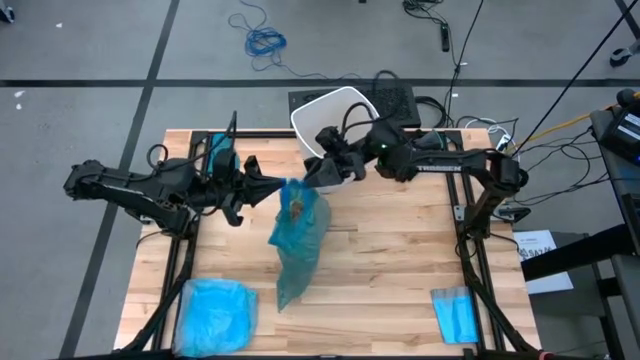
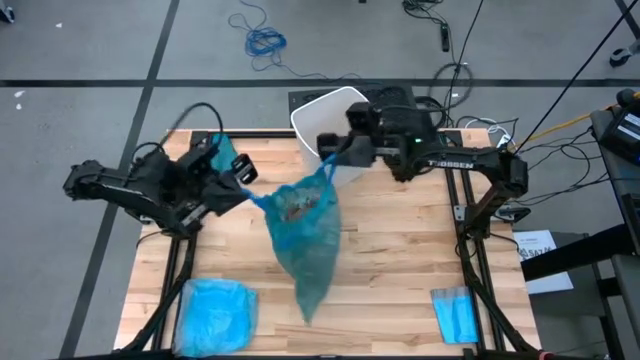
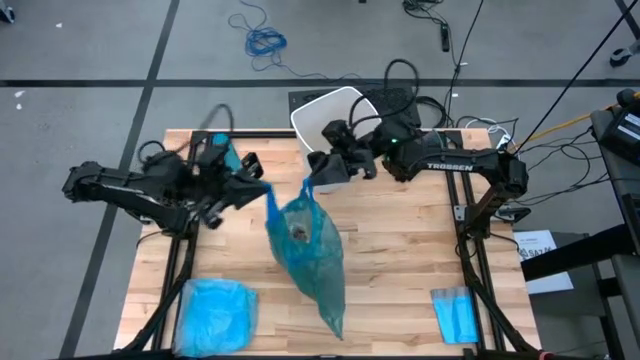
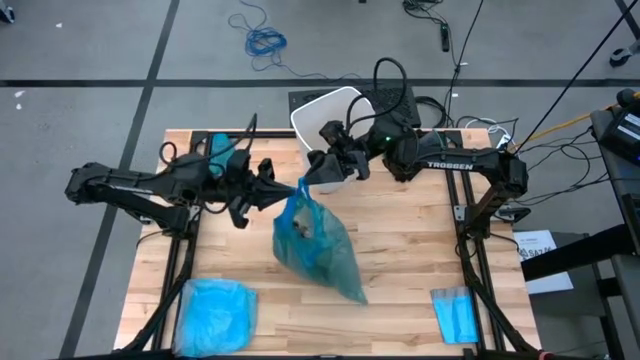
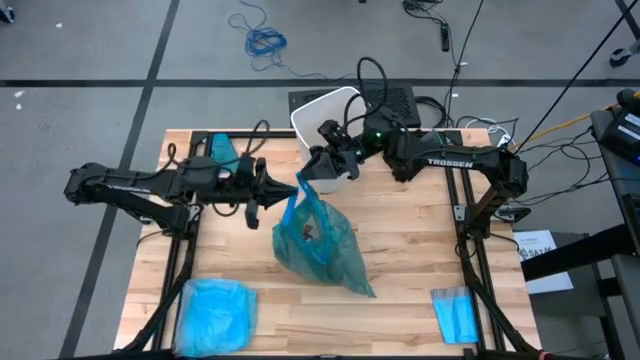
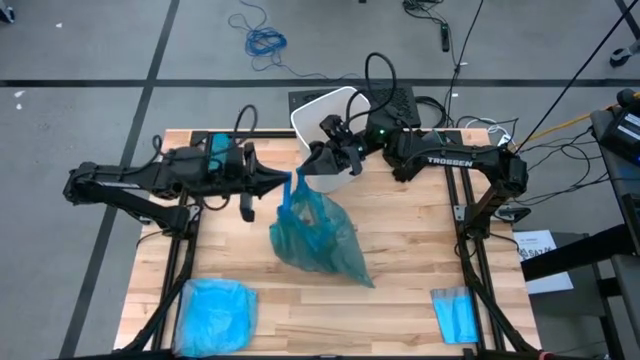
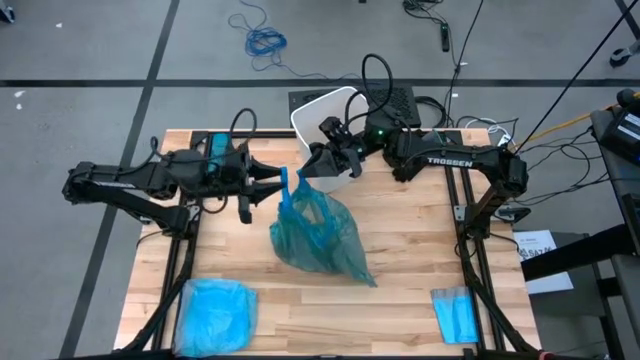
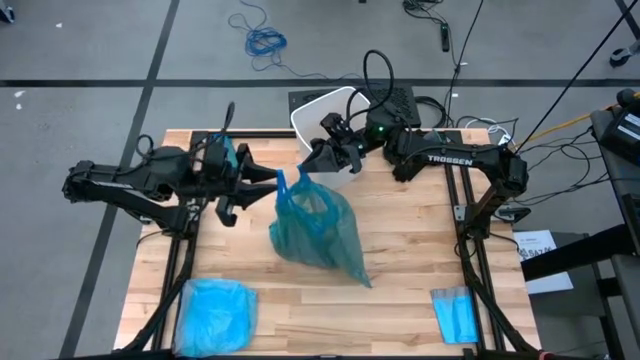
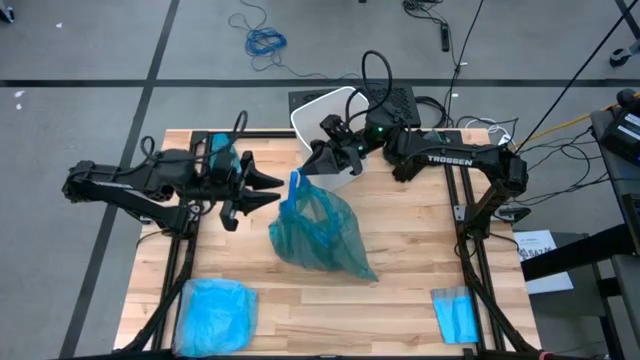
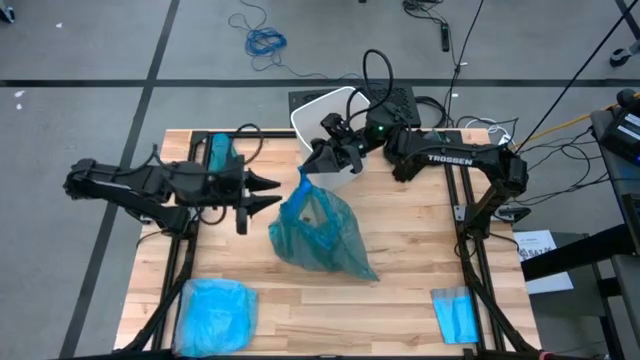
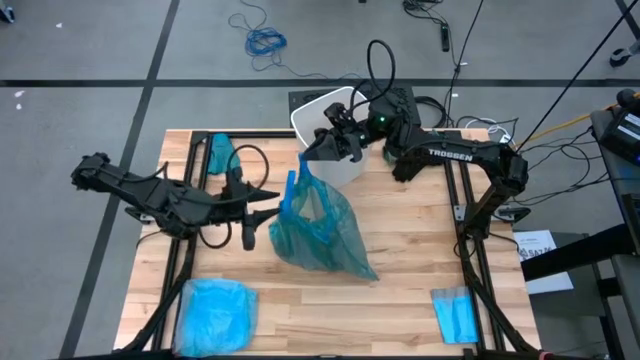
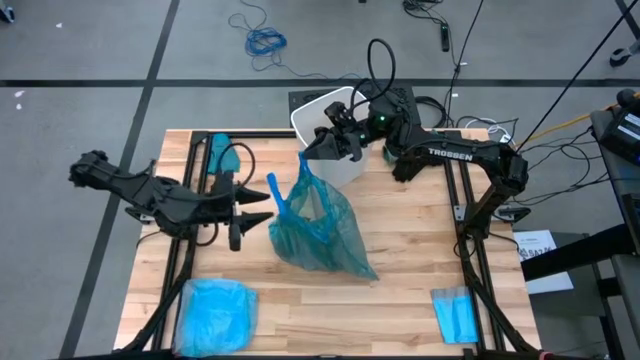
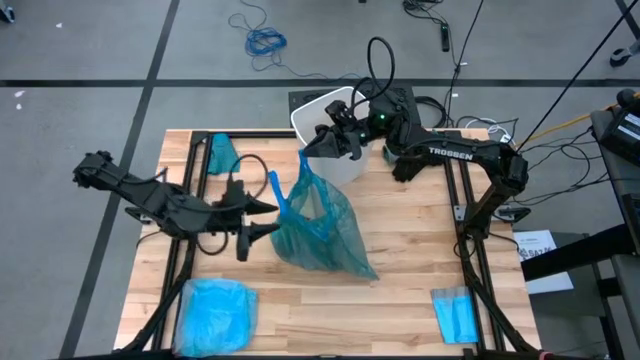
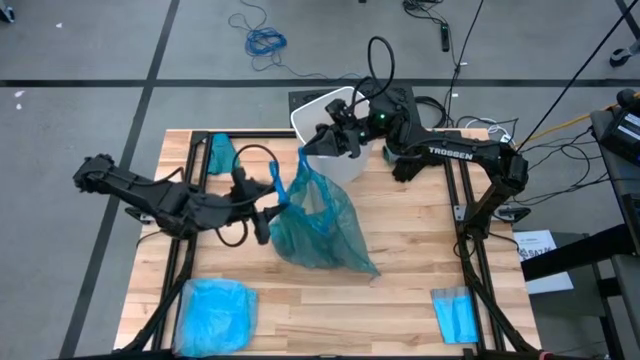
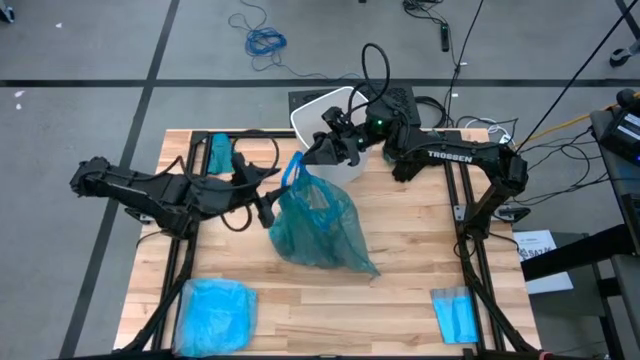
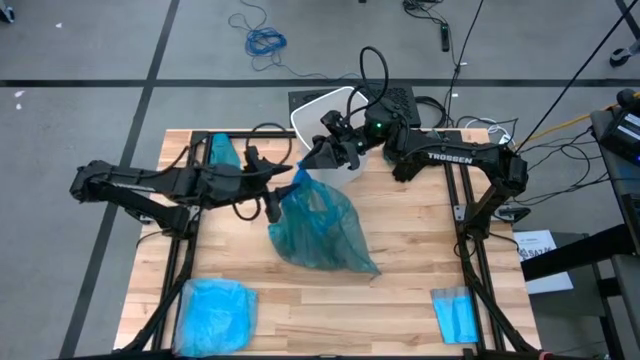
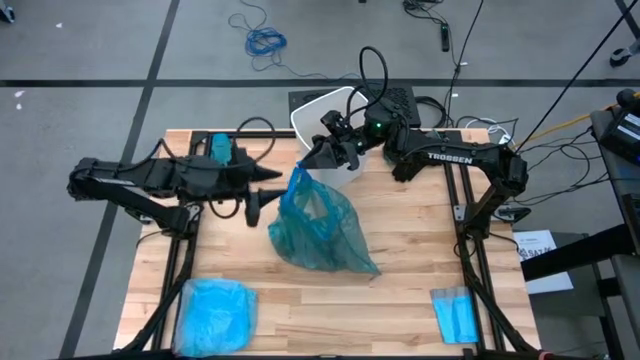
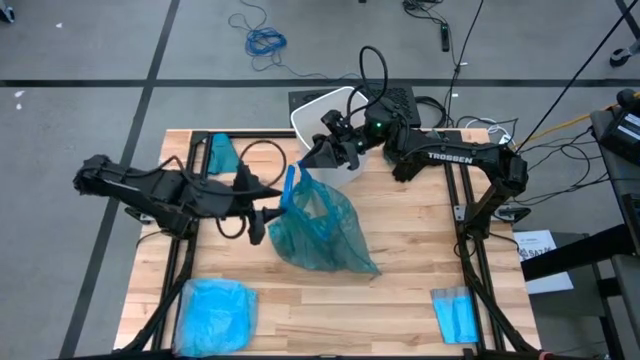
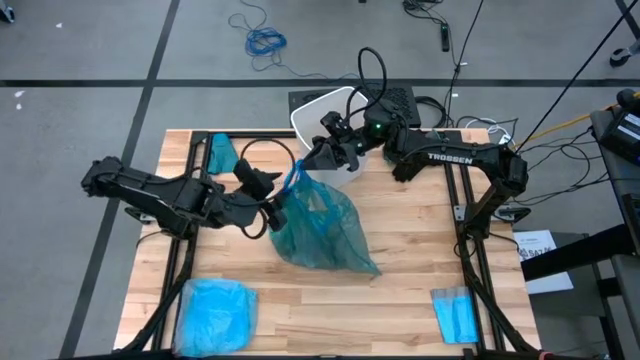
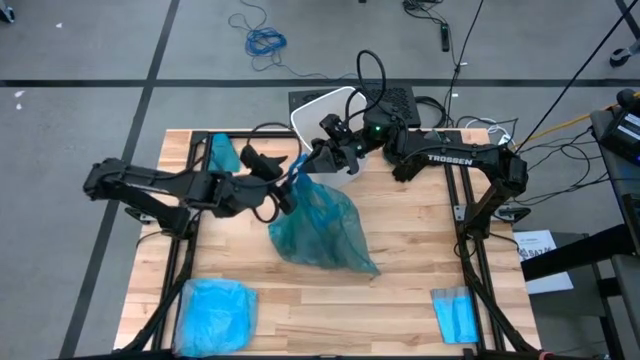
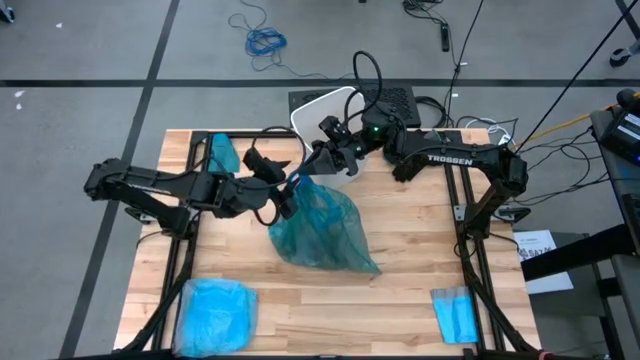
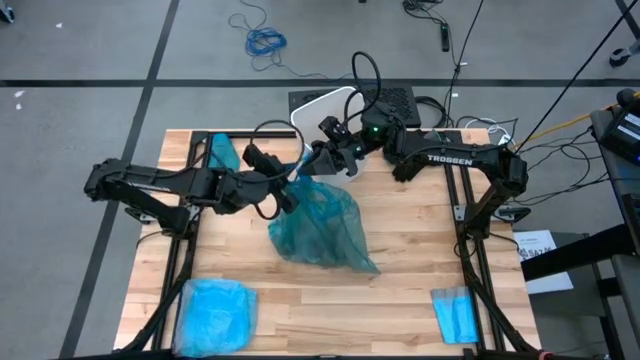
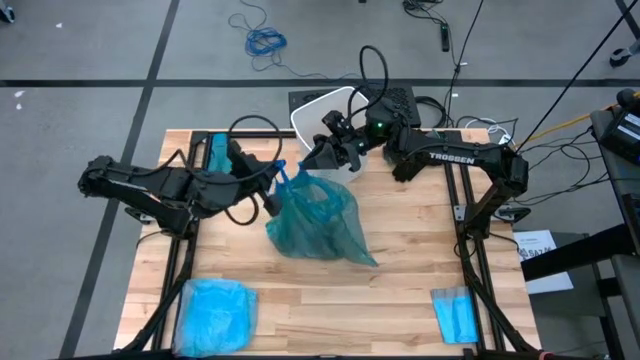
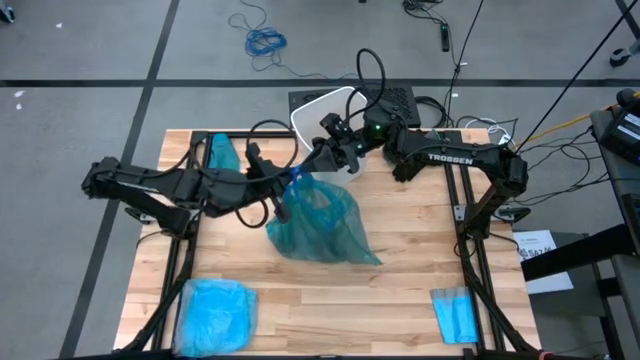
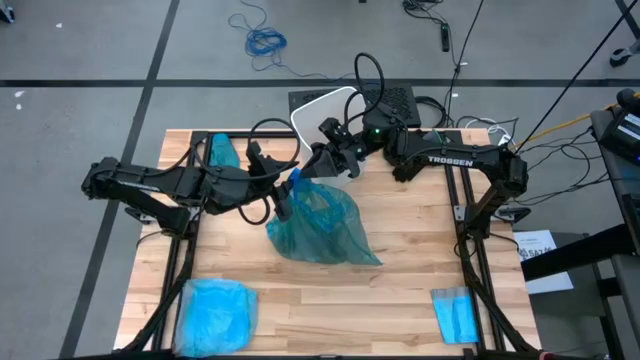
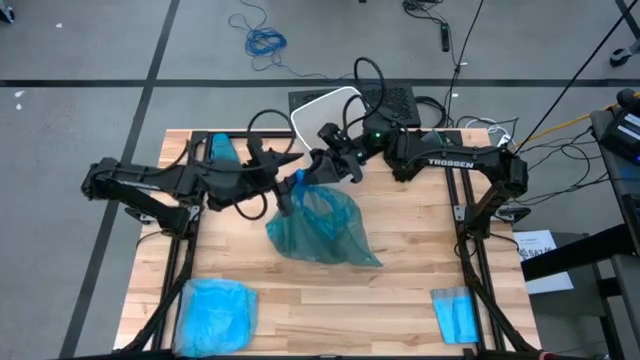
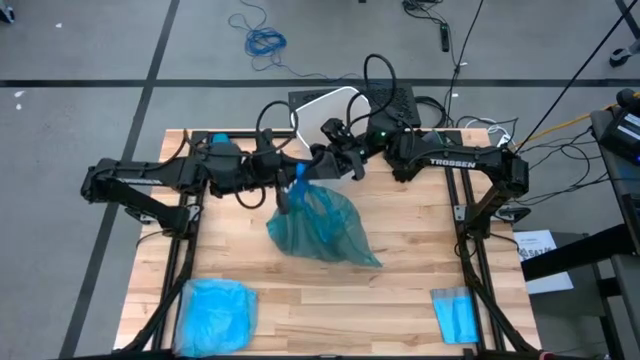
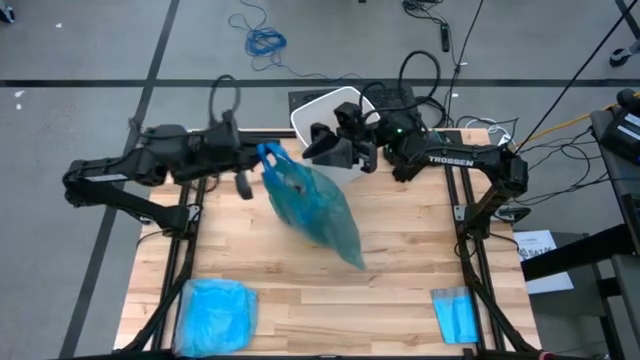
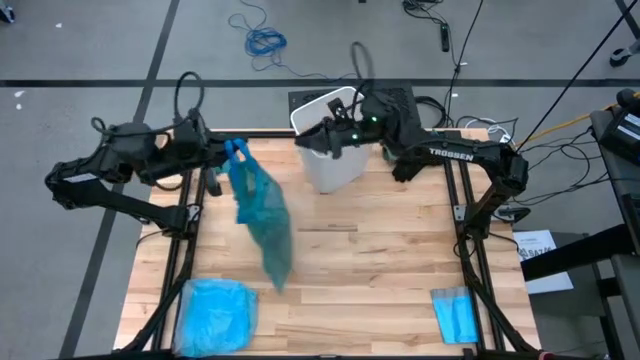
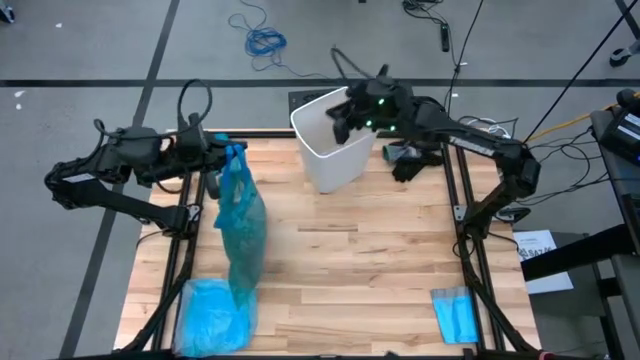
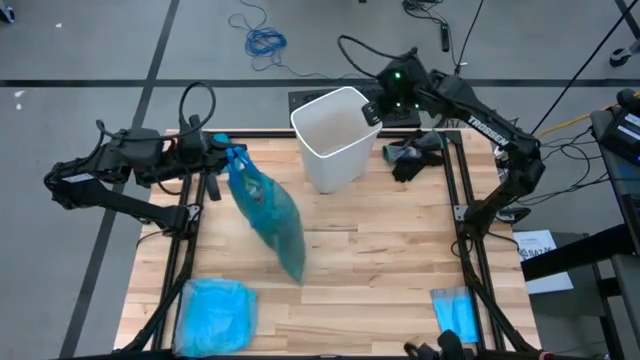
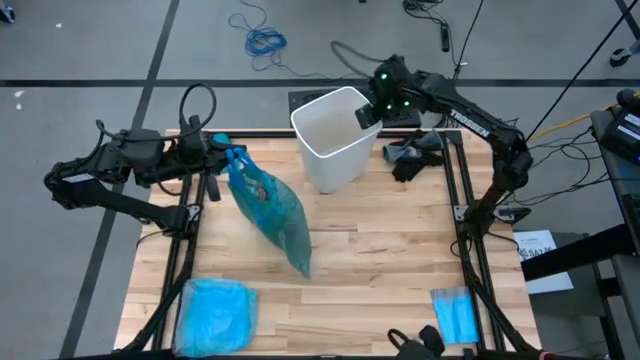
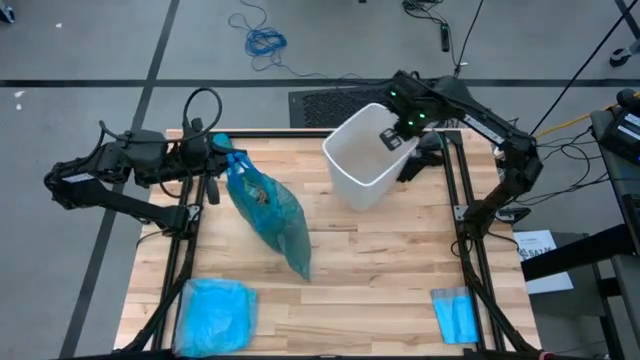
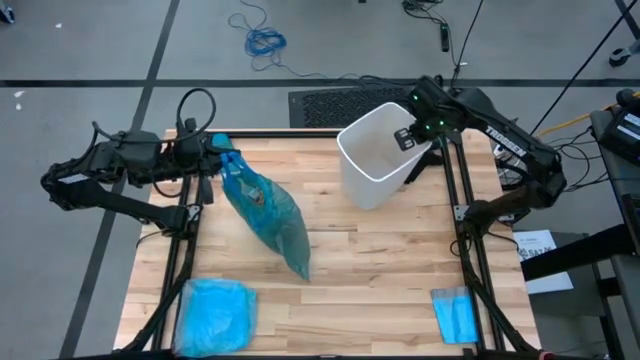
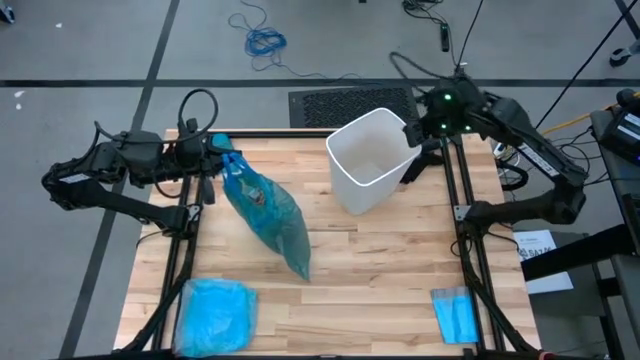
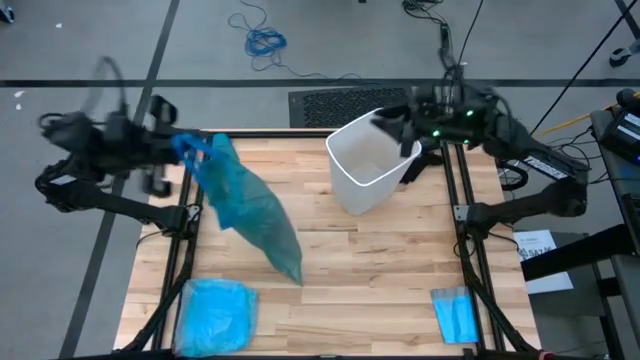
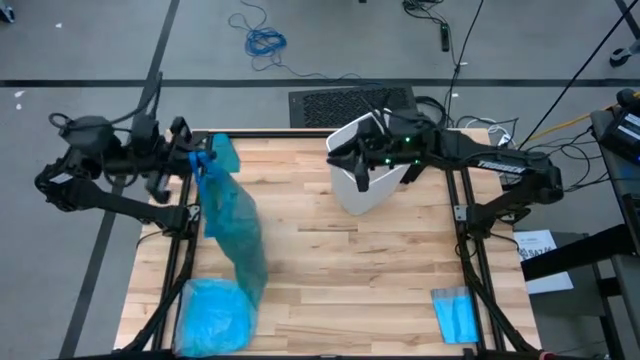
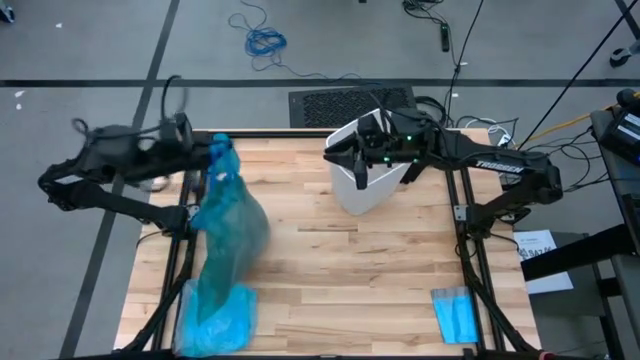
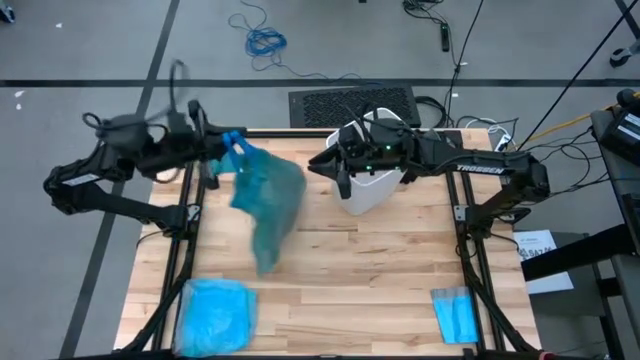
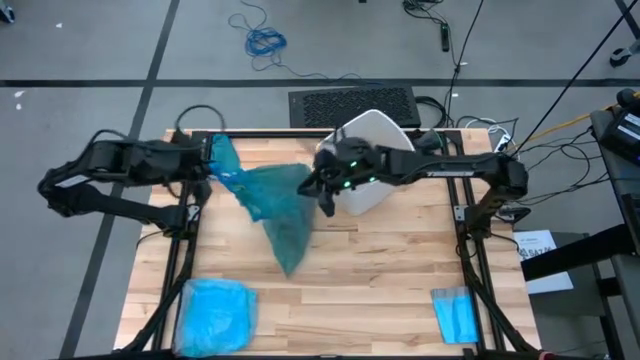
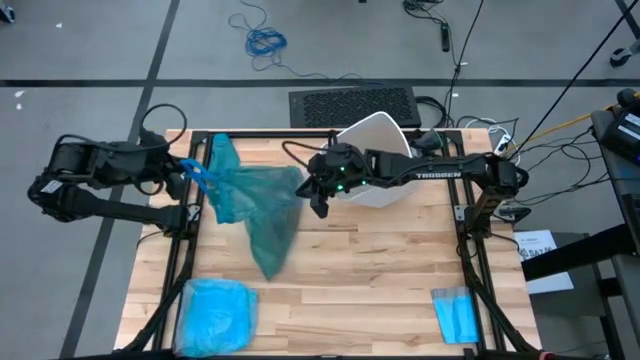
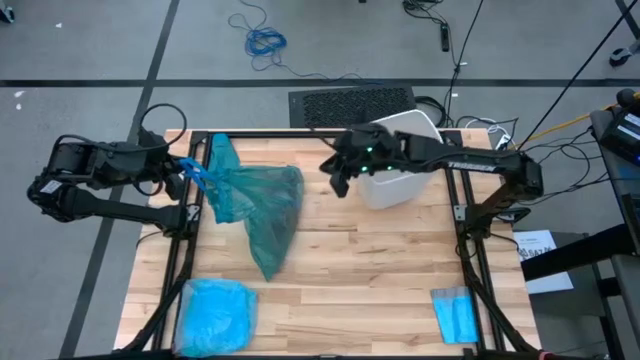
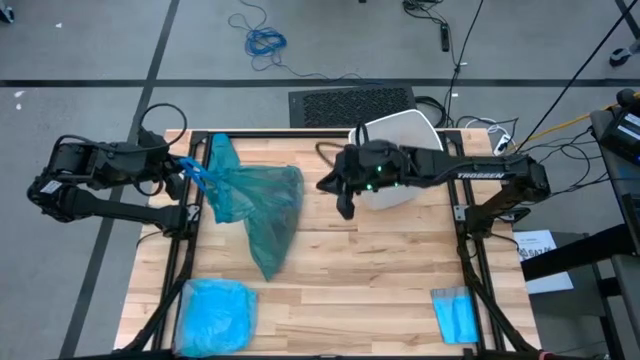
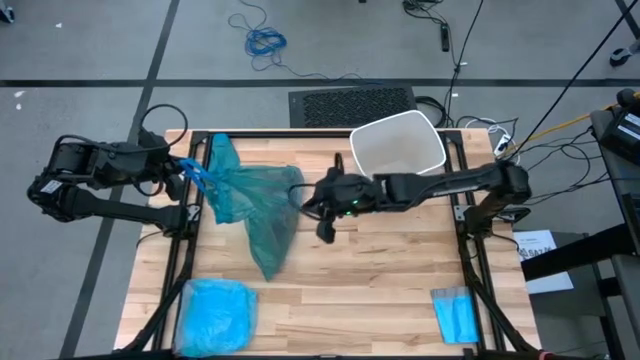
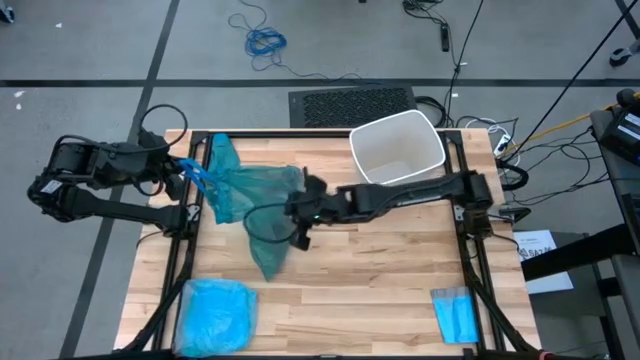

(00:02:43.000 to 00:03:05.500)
Task: place trash/remove bag and relplace
Close the blue trash bag
